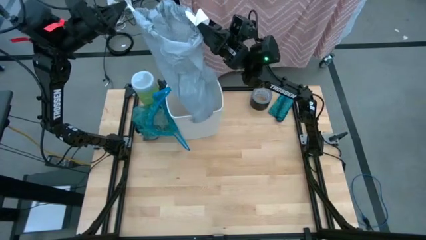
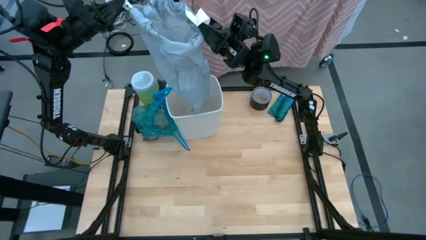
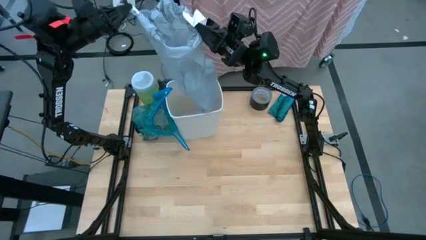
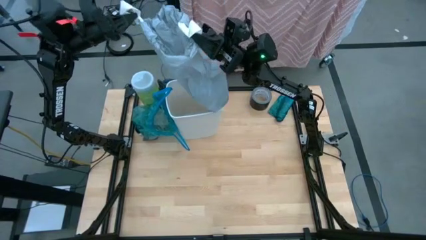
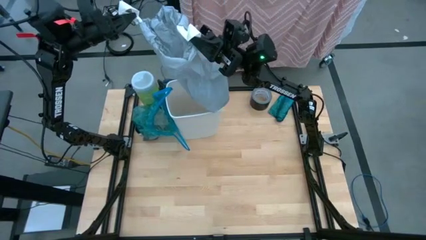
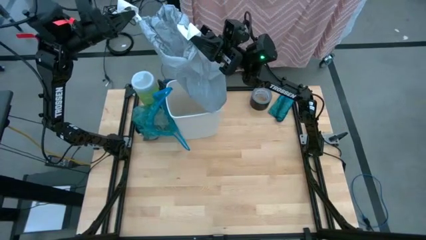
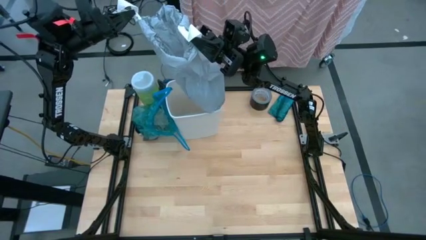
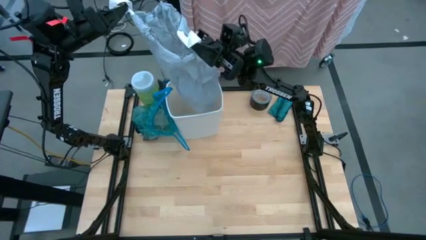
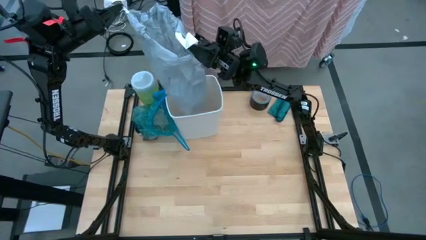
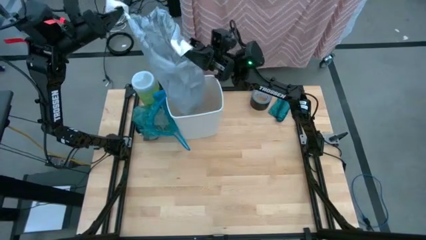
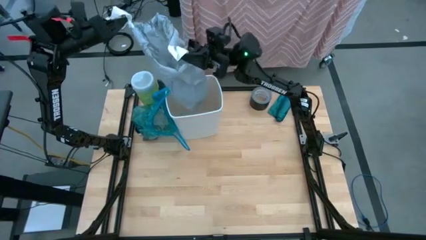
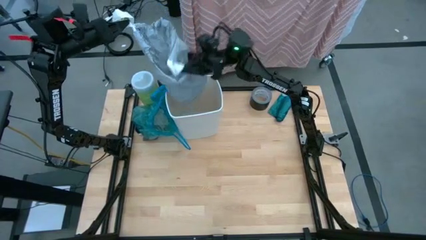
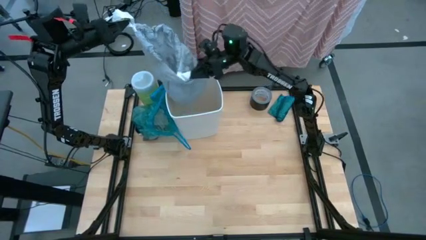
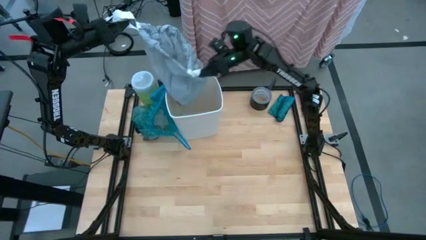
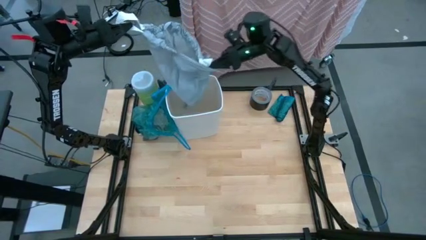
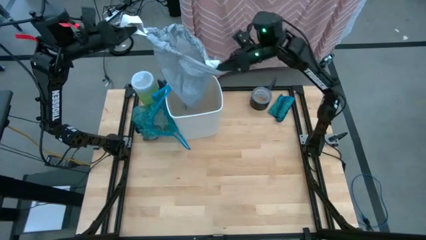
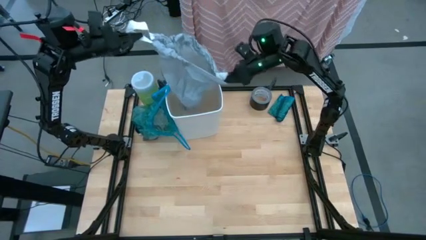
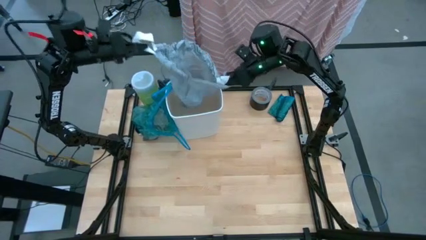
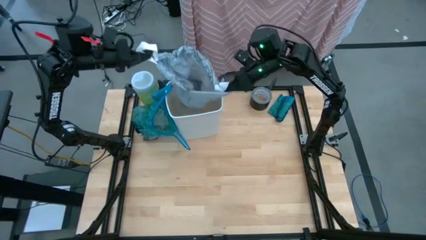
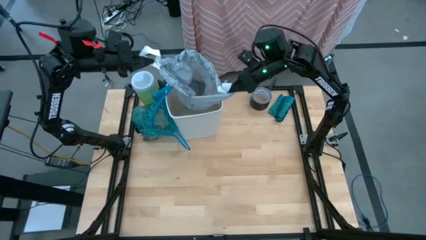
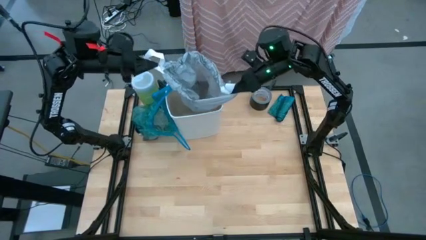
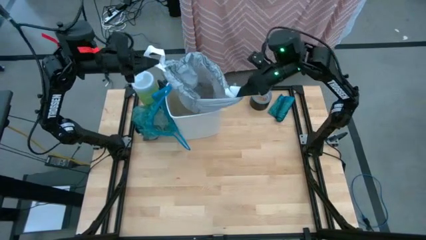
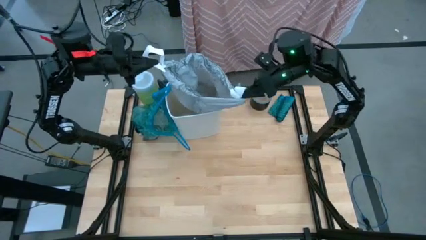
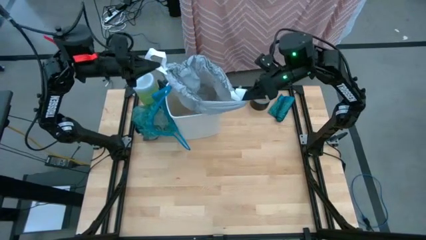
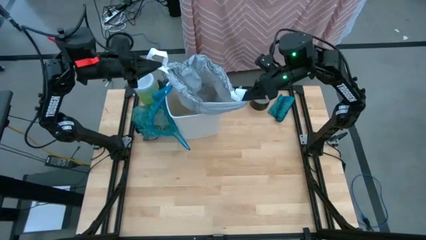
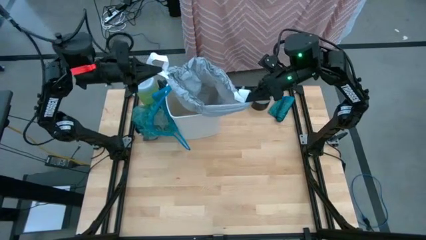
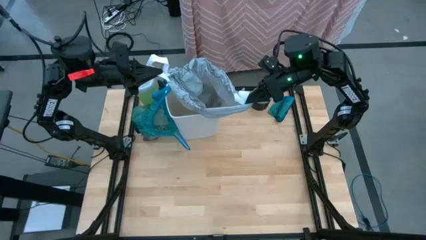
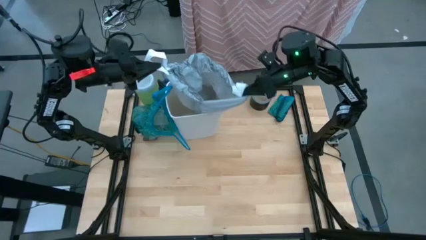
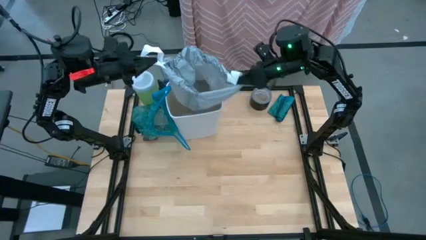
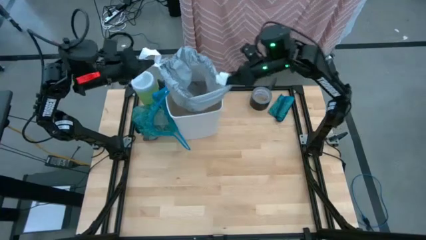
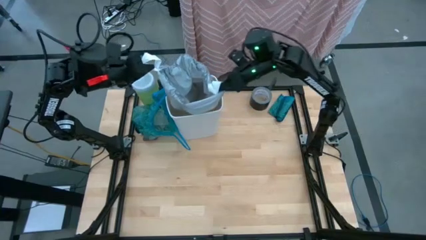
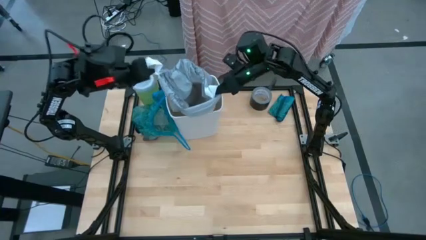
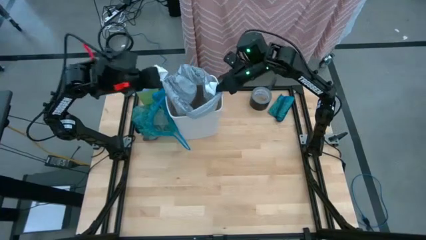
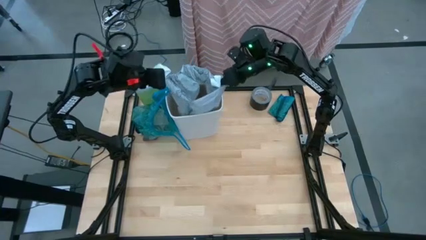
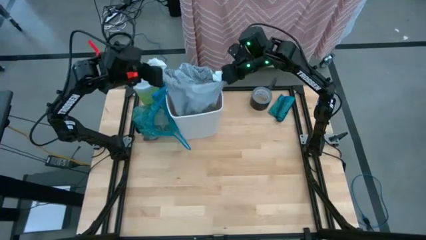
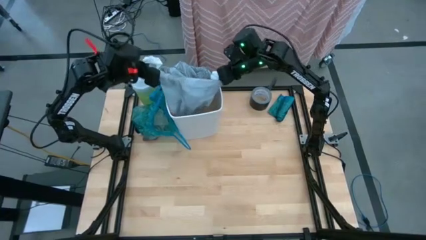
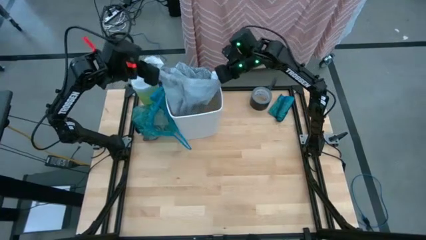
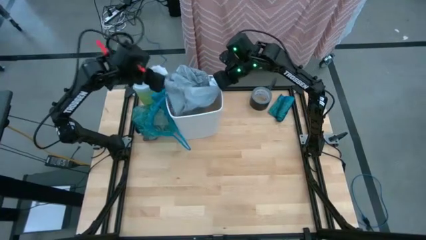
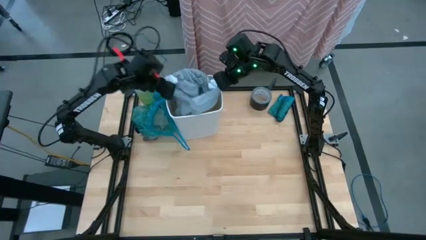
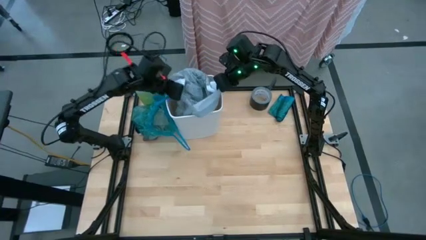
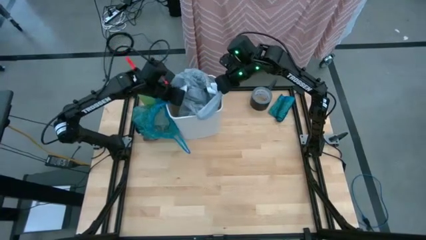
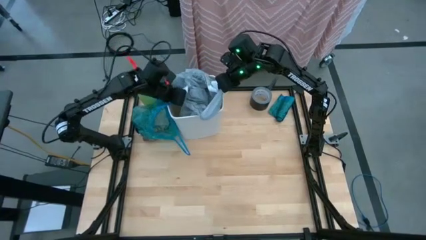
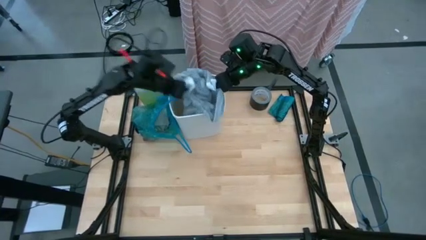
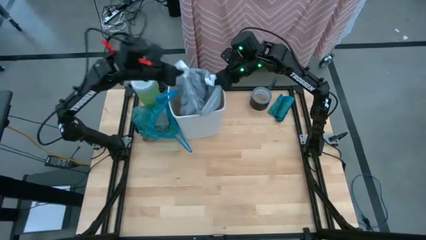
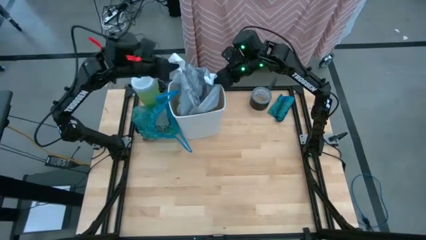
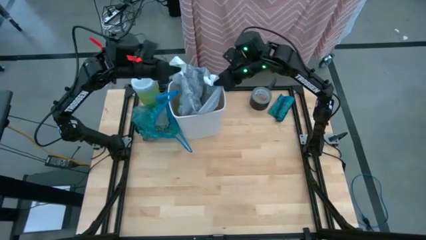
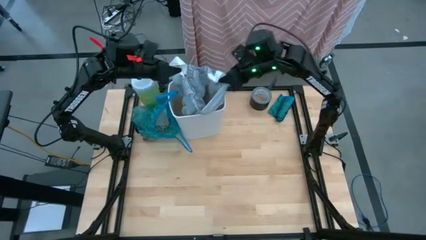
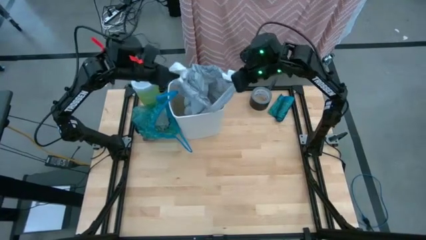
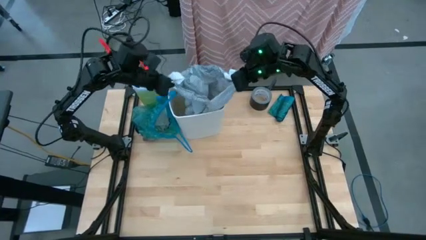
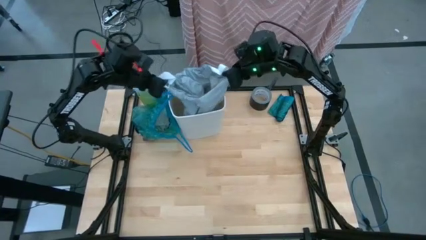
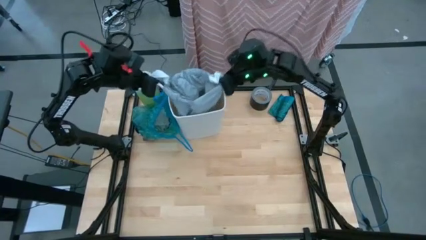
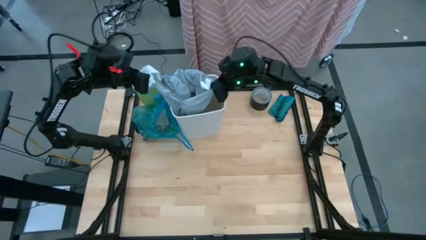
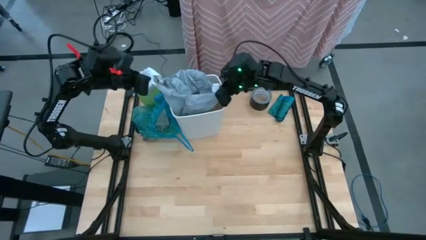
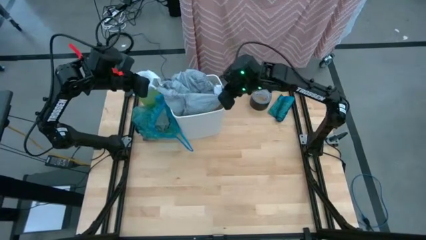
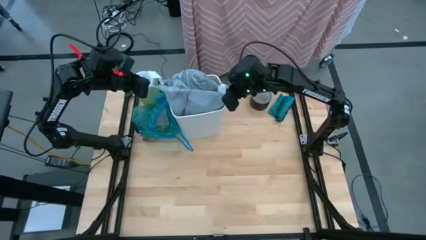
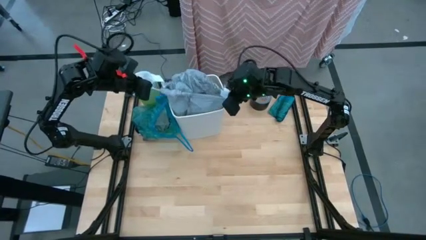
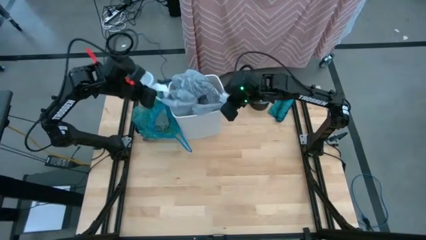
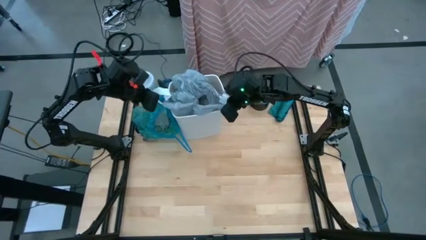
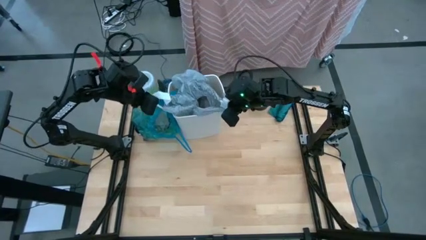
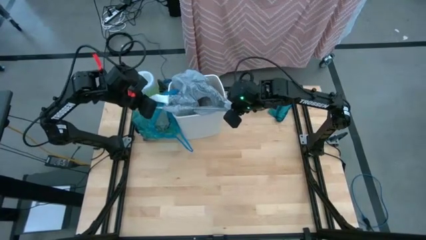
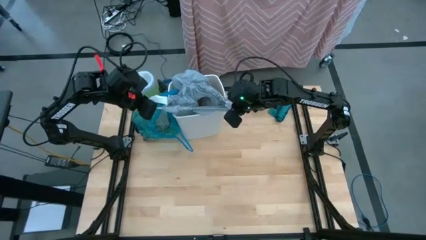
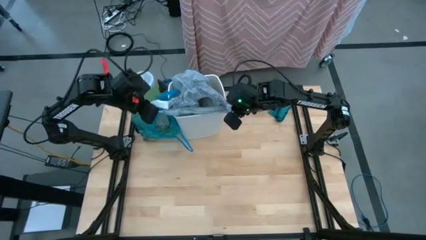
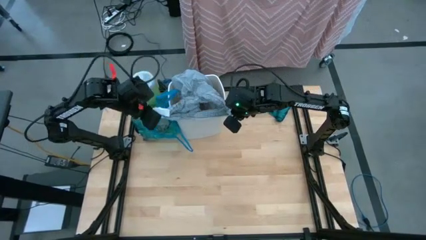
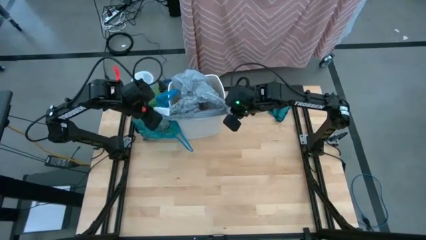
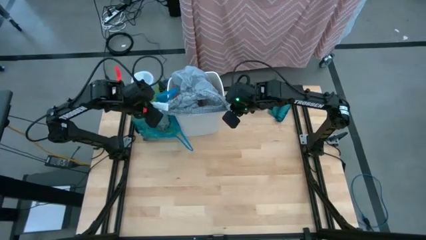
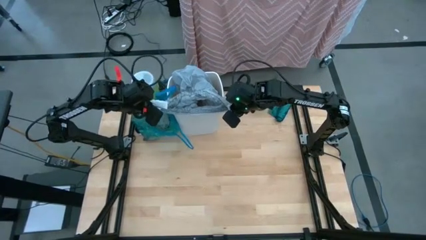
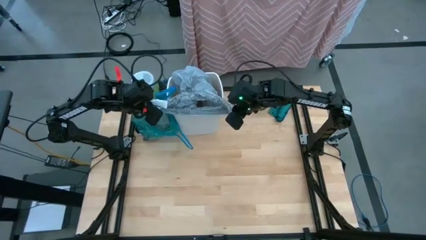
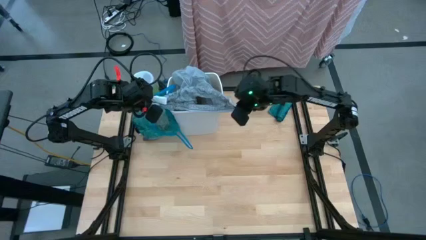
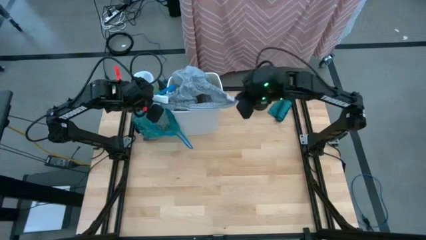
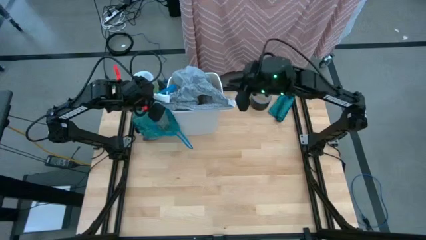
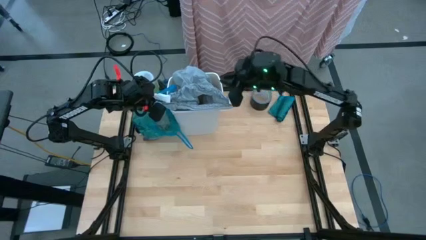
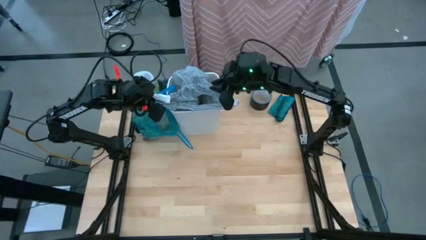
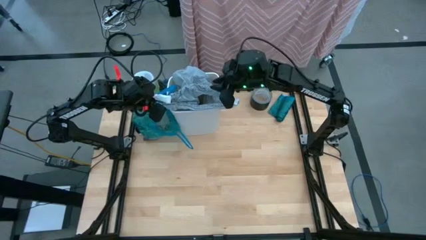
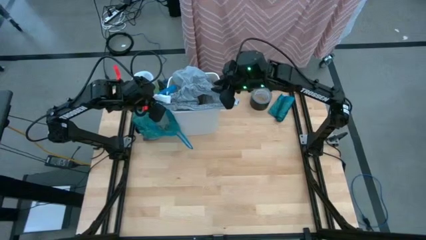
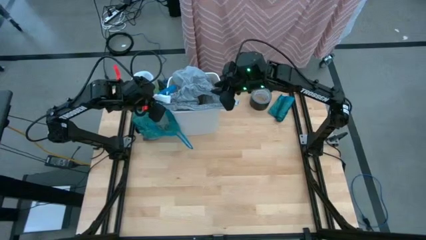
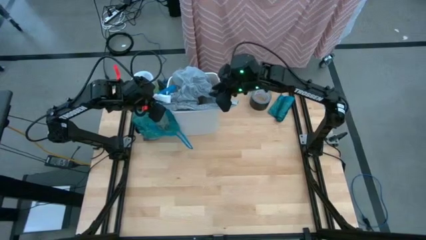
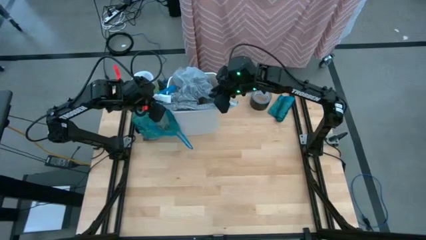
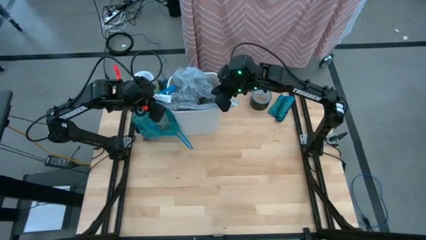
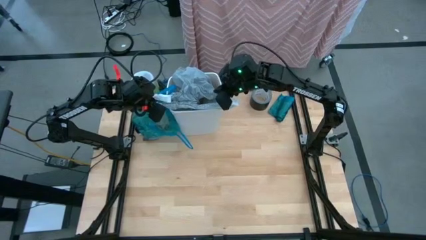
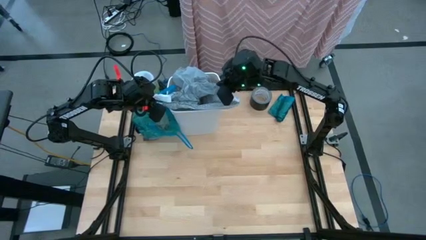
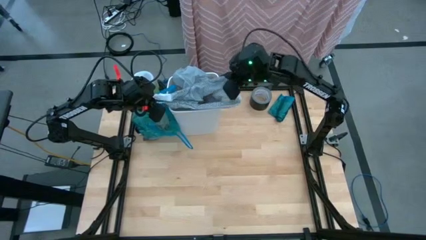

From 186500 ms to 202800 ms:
Task: place trash/remove bag and relplace
Insert the gray trash bag into the trash bin
